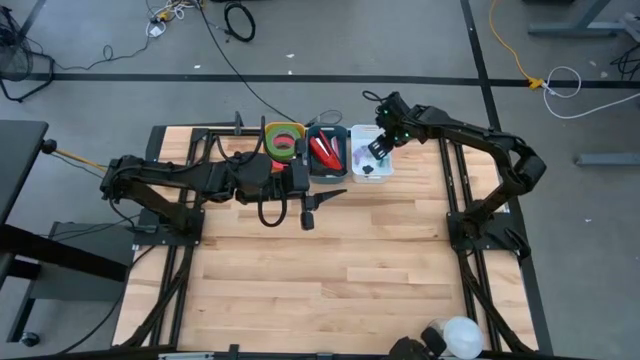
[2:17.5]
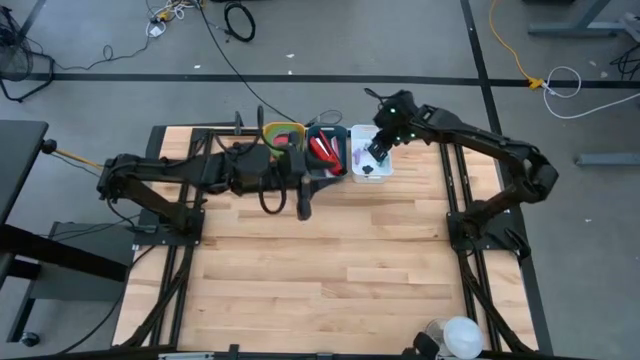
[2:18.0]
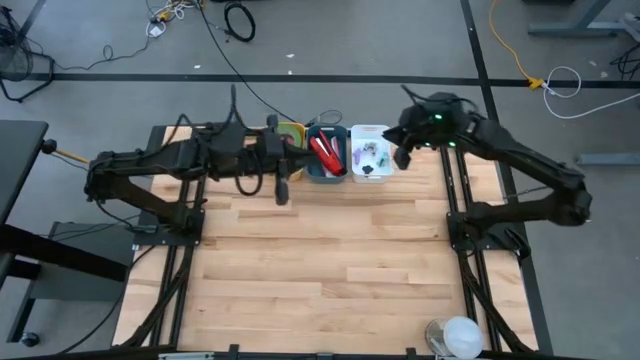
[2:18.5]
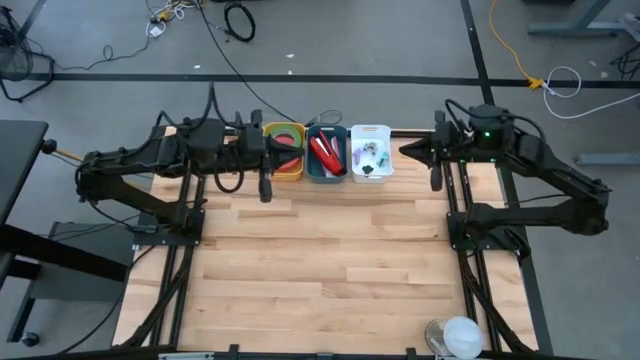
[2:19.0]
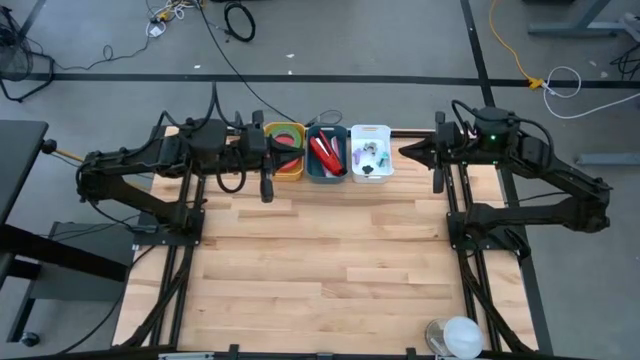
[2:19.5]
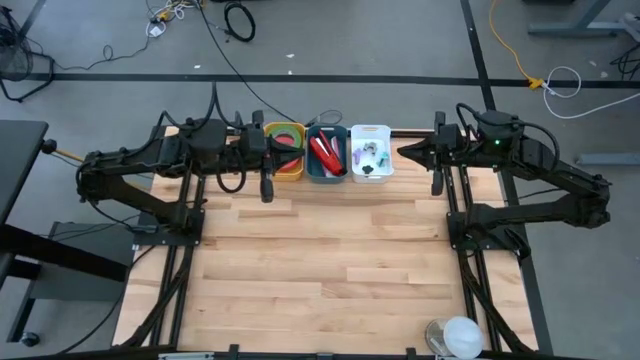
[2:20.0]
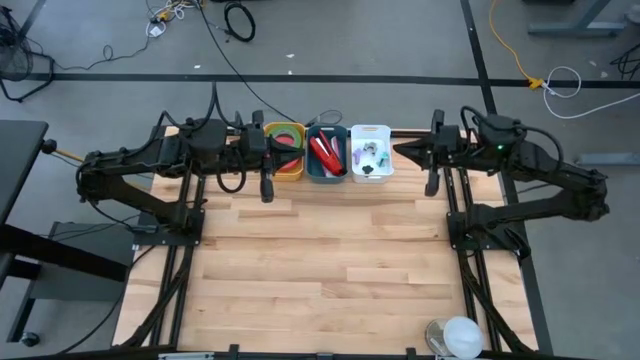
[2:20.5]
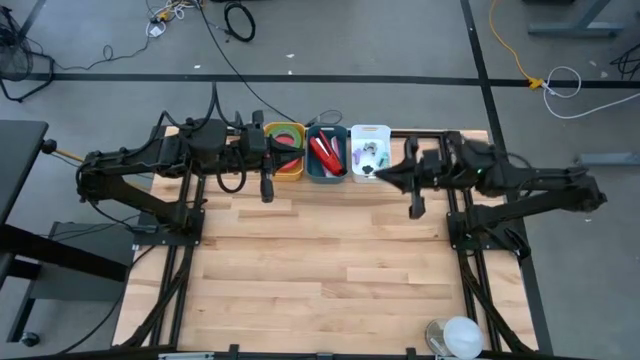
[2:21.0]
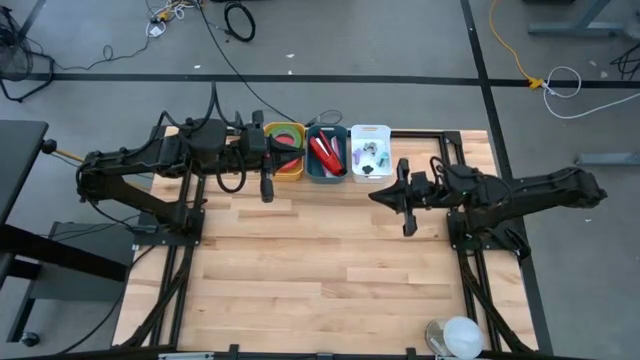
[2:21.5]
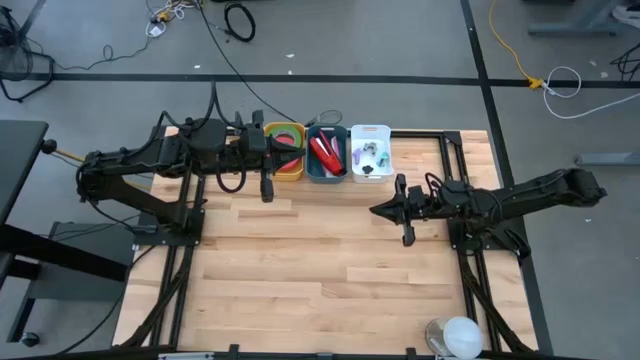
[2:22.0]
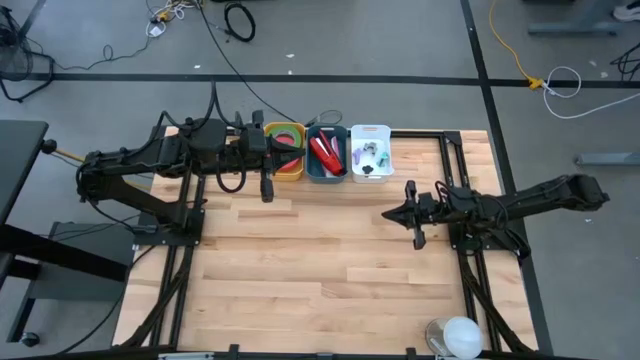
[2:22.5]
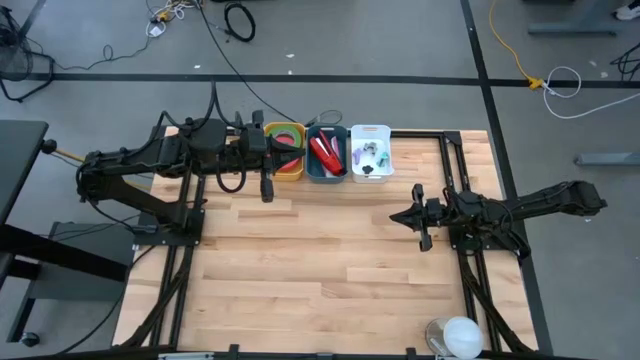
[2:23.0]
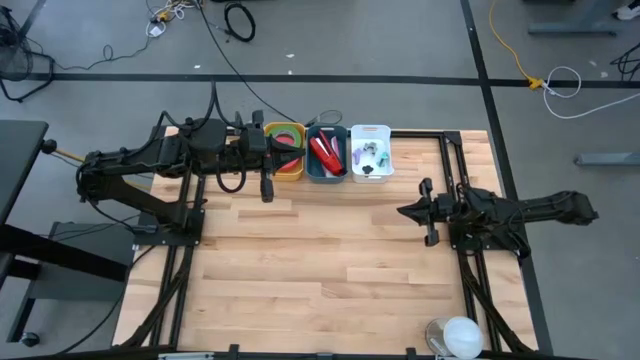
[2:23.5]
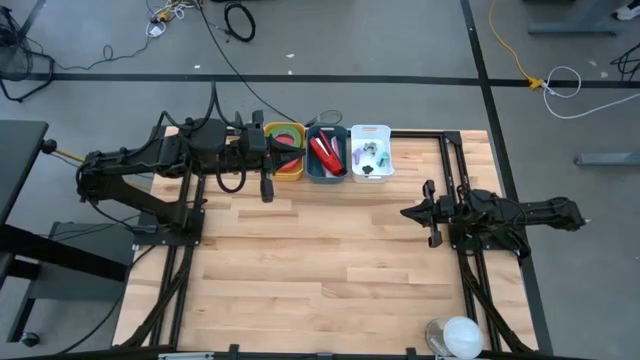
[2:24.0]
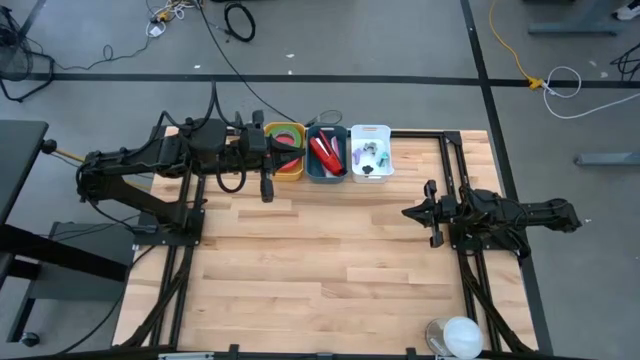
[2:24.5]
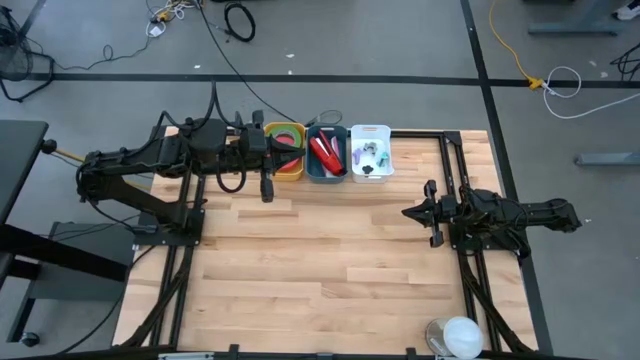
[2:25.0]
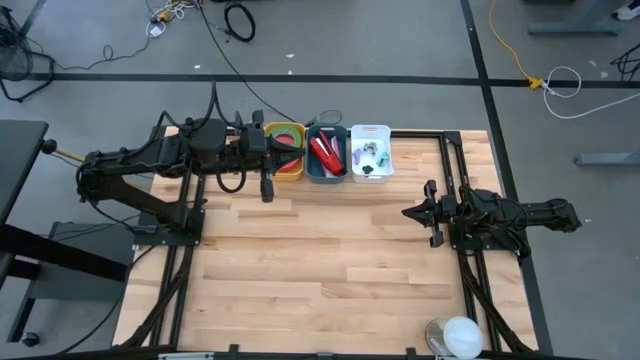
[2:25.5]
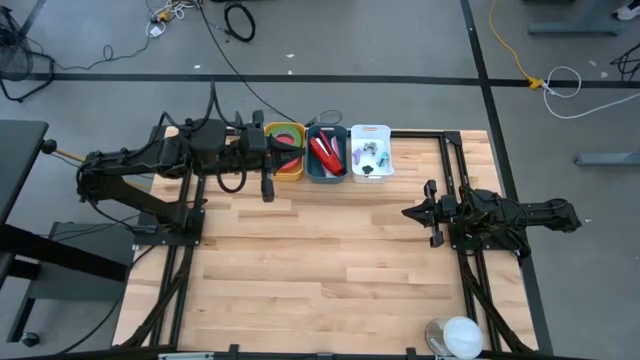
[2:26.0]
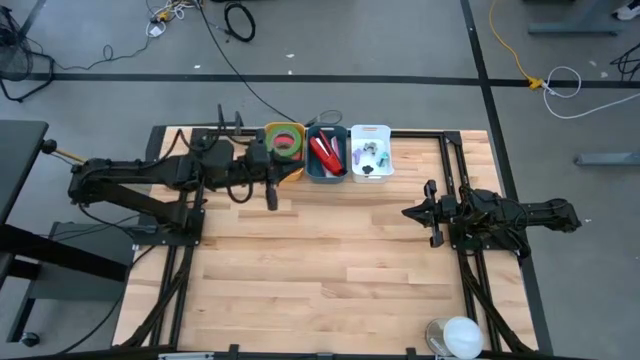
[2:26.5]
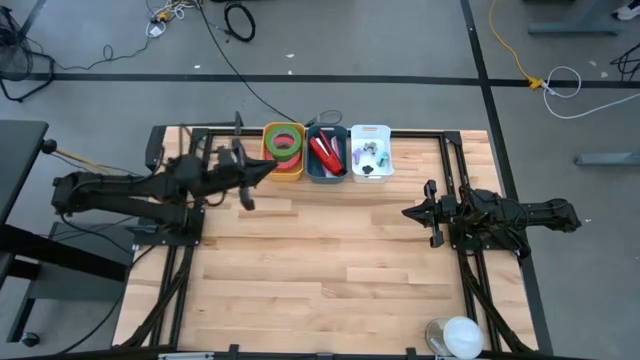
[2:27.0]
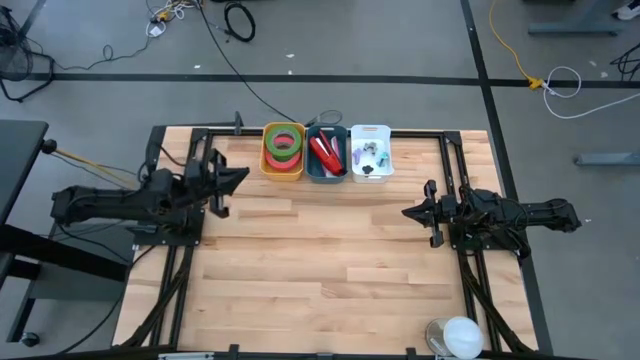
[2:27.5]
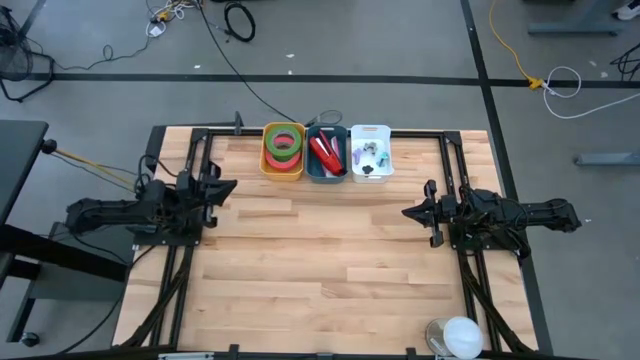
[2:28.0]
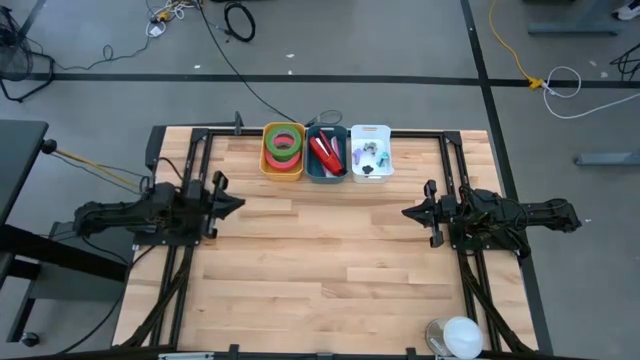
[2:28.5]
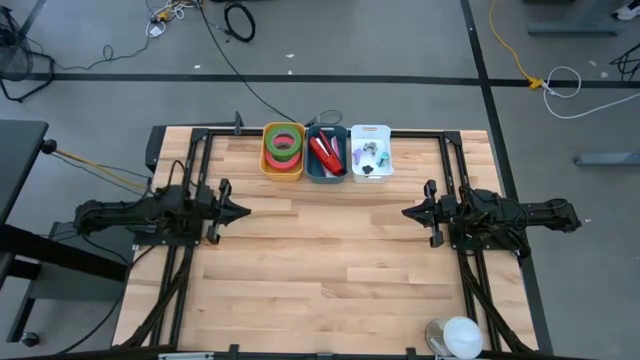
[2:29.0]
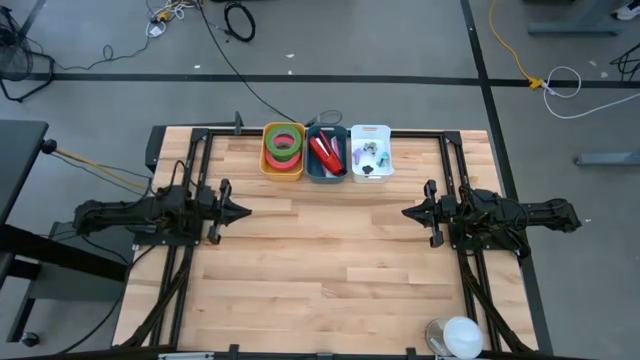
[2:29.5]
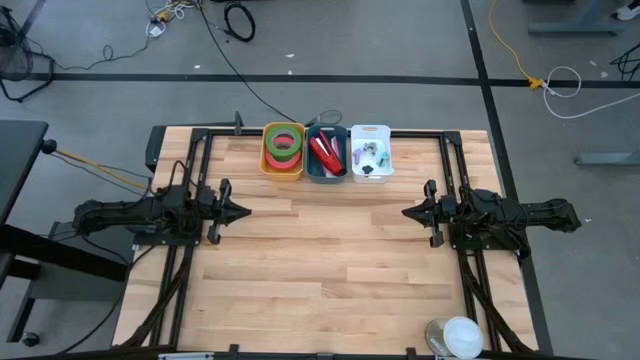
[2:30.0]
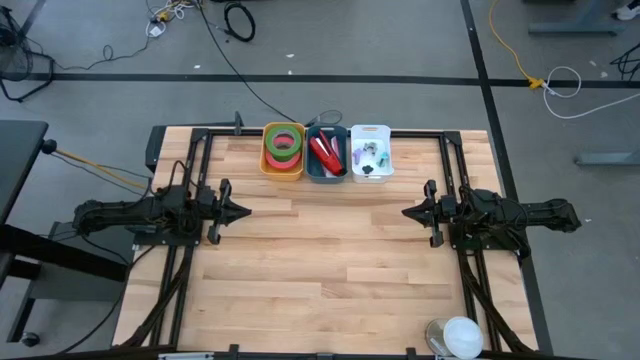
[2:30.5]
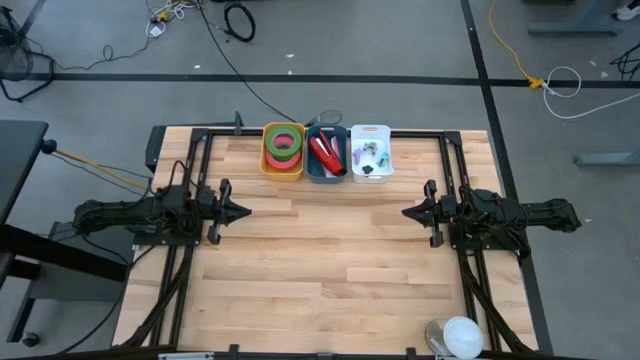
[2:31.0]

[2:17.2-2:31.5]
Task: Pick and place Stapler, Stapler remover, tape
Return to Home Position

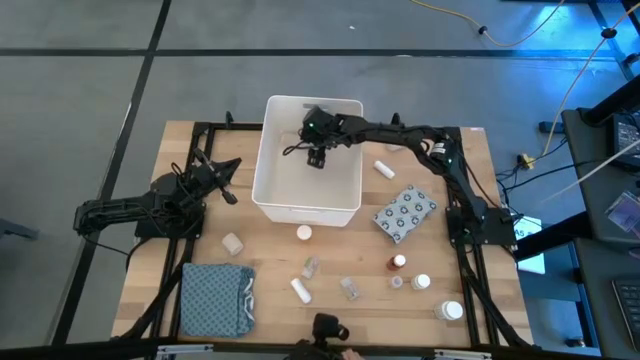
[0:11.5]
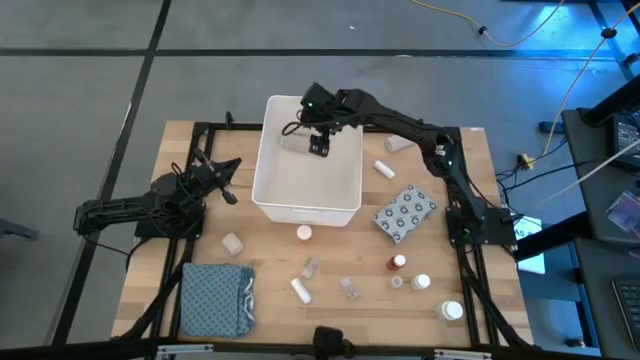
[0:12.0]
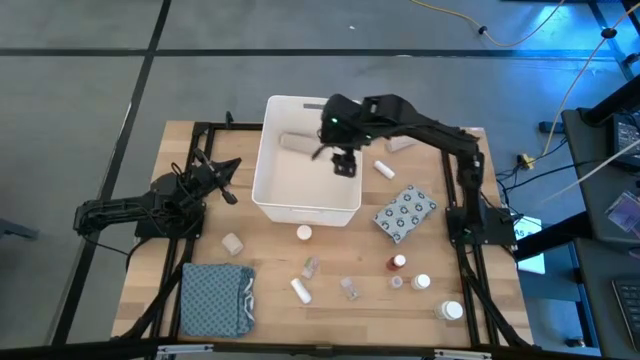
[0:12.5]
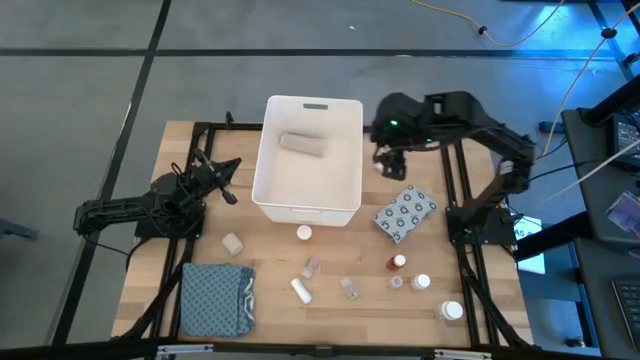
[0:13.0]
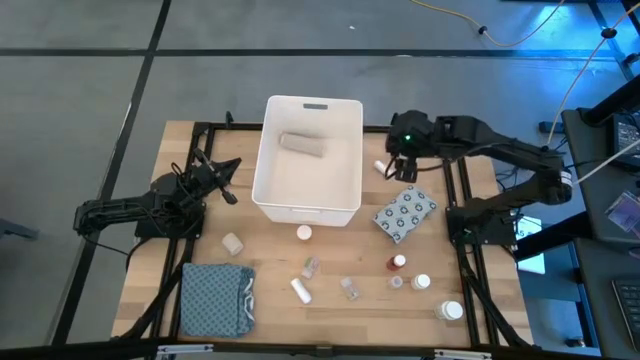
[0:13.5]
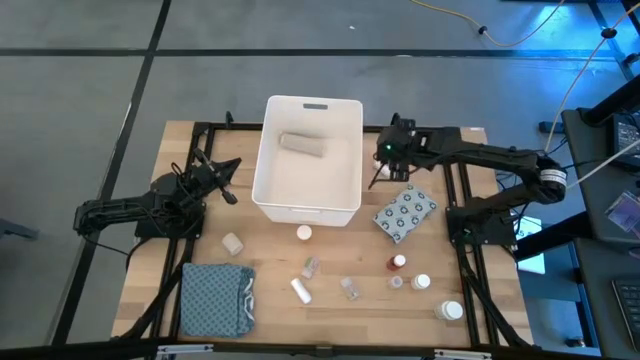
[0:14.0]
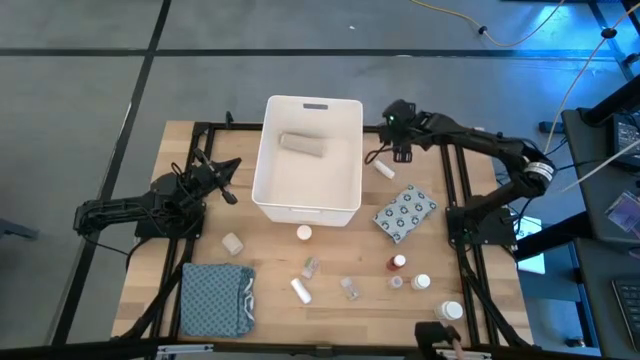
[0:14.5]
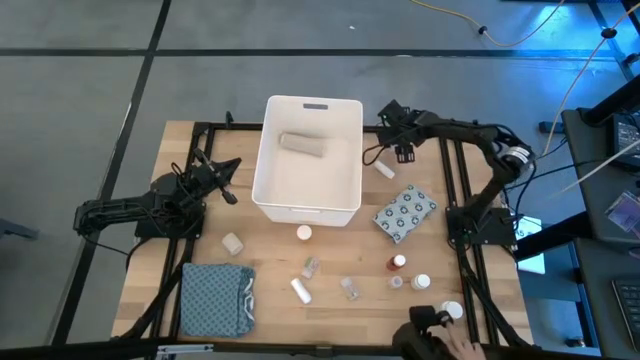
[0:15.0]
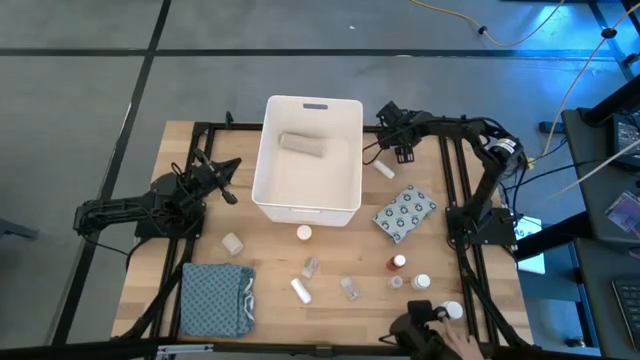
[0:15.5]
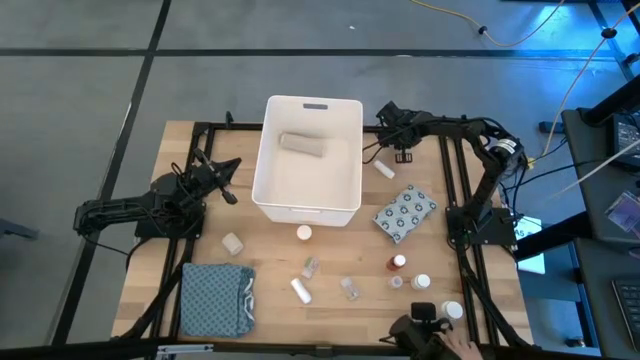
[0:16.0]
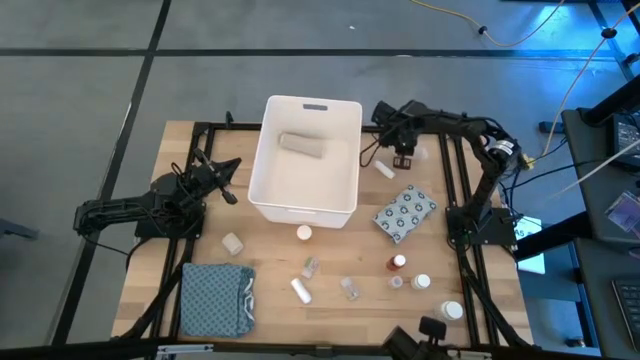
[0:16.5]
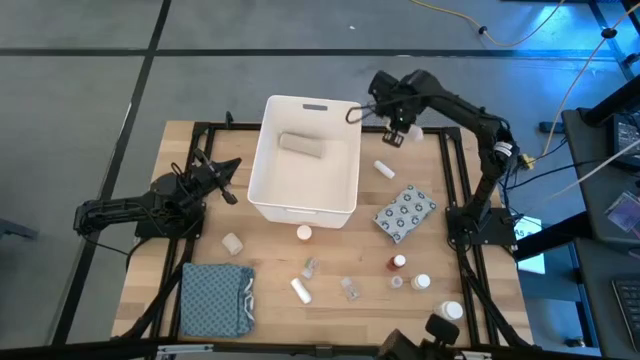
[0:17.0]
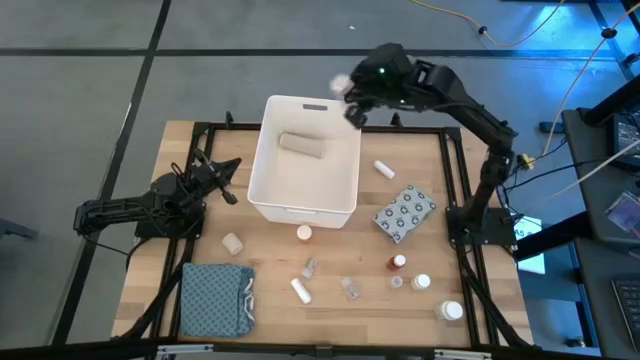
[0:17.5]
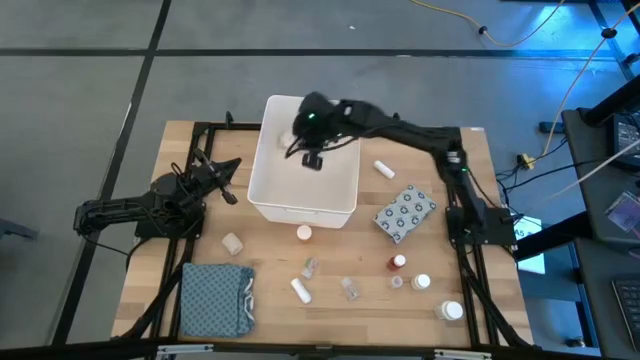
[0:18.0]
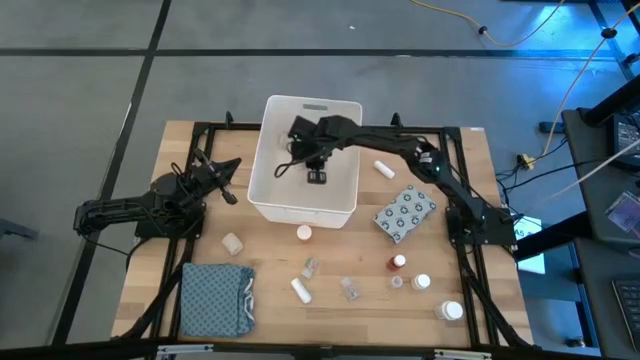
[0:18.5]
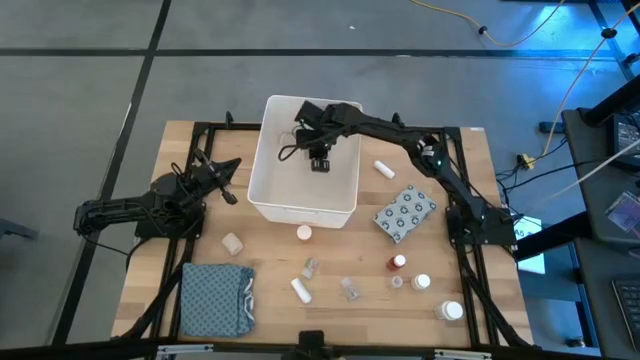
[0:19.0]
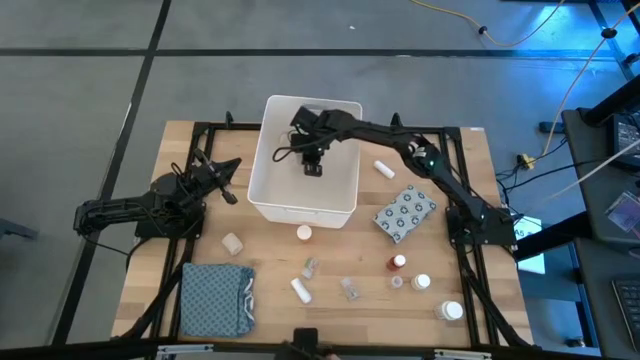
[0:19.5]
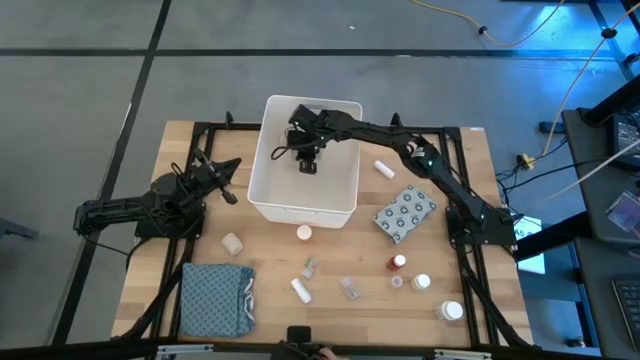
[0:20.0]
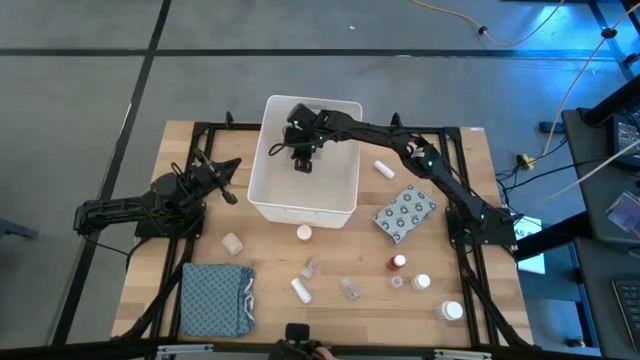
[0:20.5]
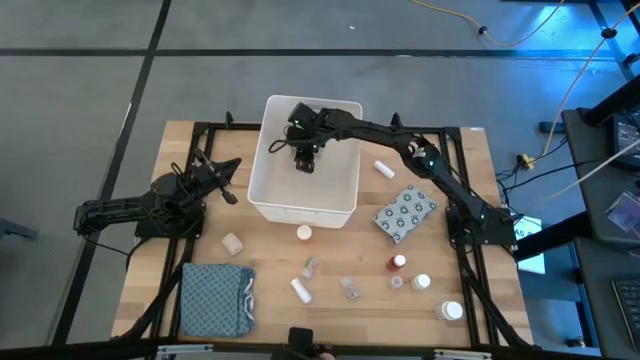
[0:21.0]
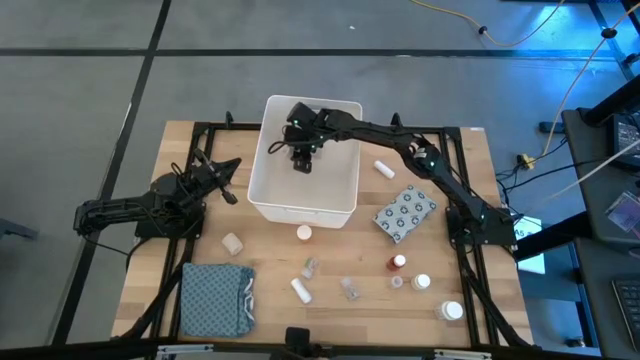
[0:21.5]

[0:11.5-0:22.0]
Task: Pick & place medical supplies in basket/bin
Put the top rolled brown bandage into the white bin
